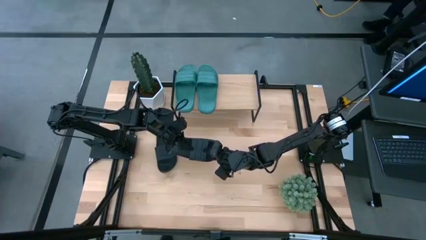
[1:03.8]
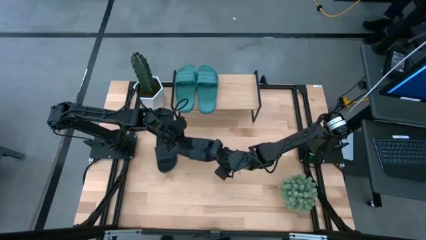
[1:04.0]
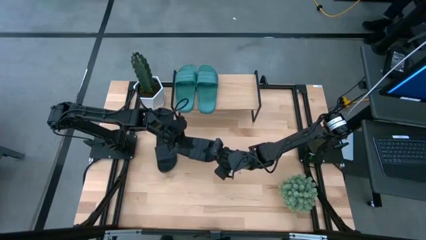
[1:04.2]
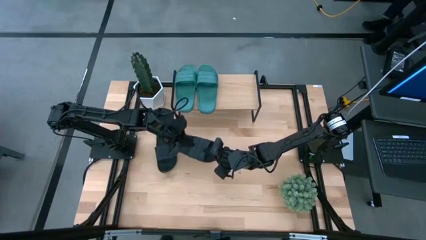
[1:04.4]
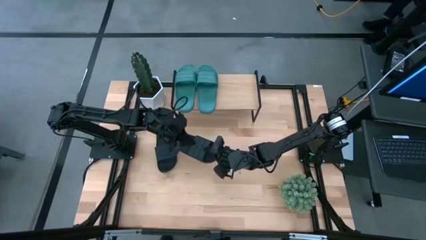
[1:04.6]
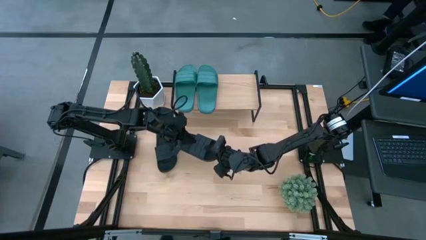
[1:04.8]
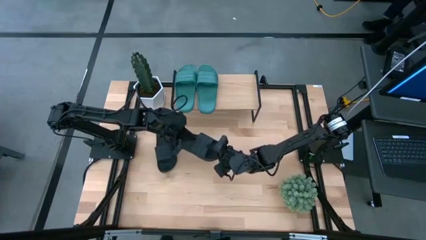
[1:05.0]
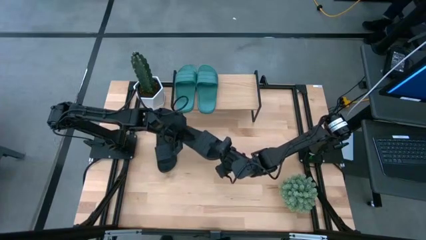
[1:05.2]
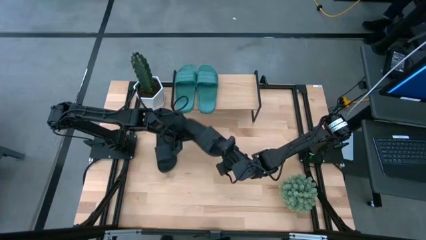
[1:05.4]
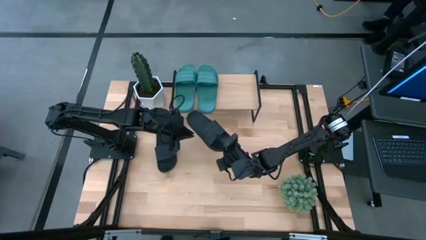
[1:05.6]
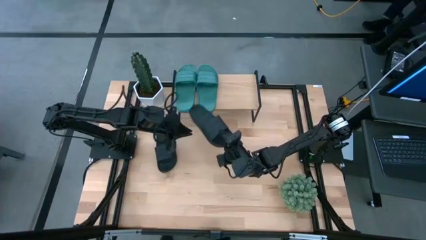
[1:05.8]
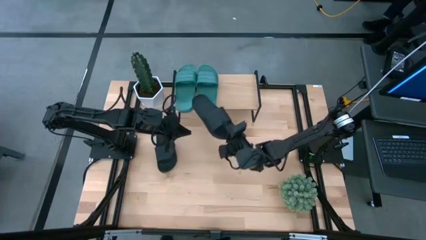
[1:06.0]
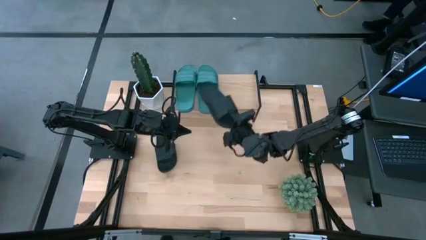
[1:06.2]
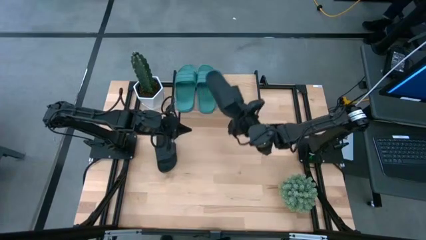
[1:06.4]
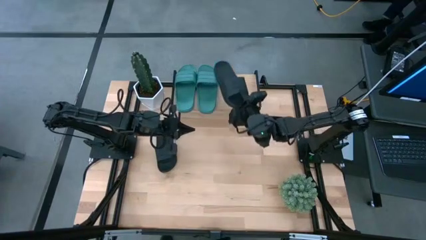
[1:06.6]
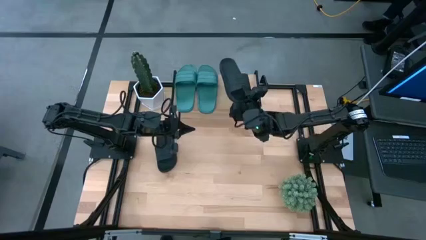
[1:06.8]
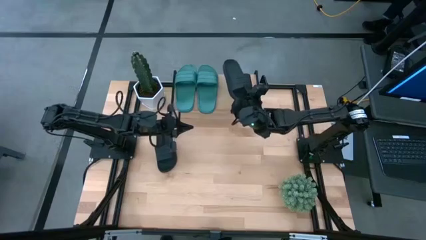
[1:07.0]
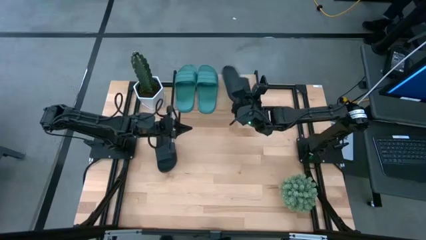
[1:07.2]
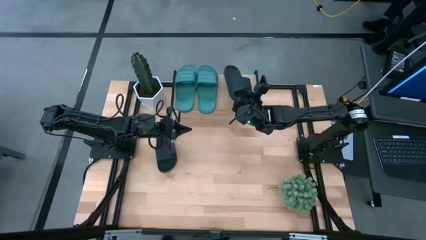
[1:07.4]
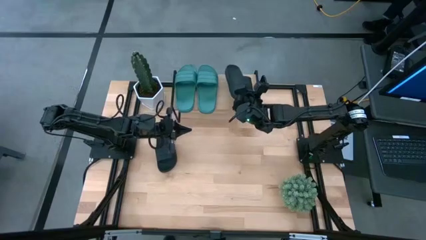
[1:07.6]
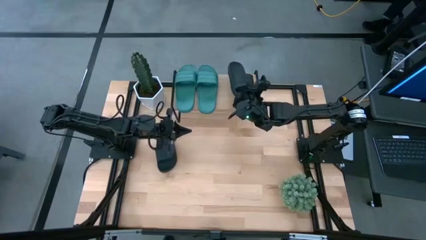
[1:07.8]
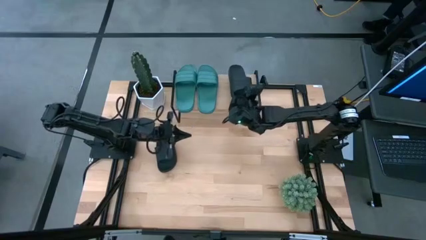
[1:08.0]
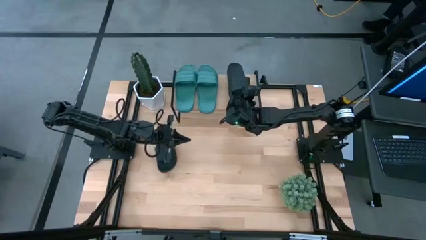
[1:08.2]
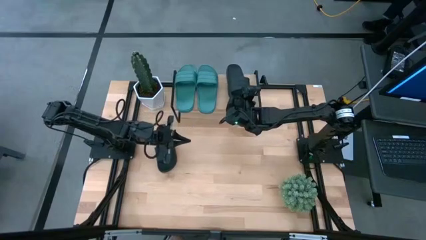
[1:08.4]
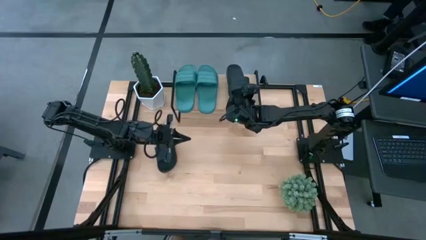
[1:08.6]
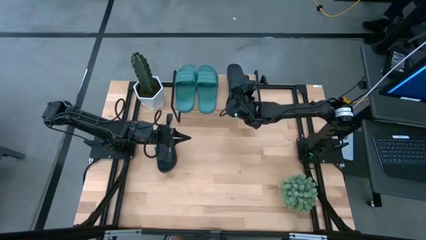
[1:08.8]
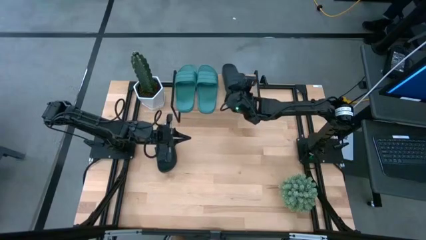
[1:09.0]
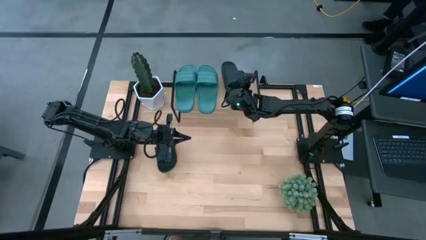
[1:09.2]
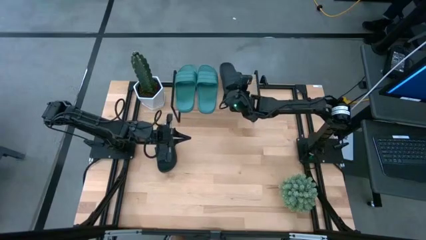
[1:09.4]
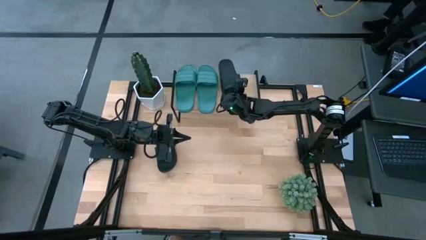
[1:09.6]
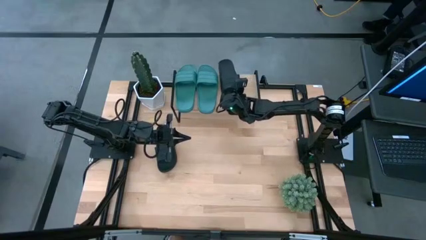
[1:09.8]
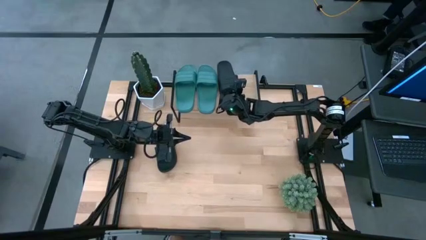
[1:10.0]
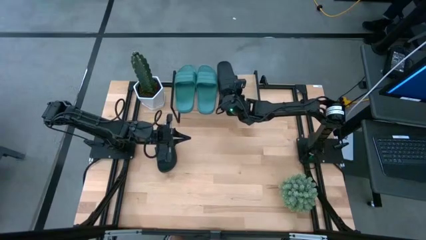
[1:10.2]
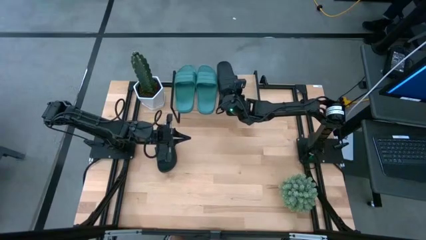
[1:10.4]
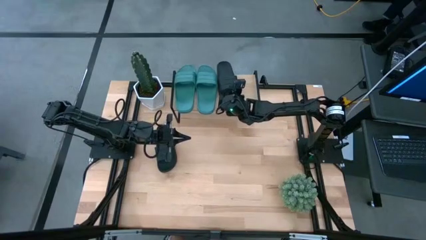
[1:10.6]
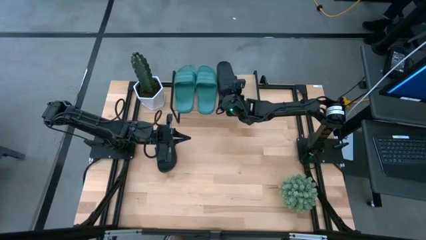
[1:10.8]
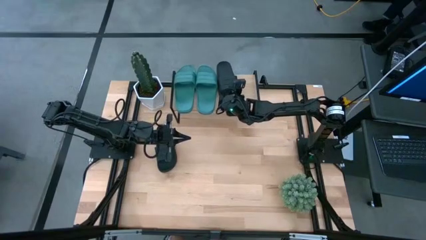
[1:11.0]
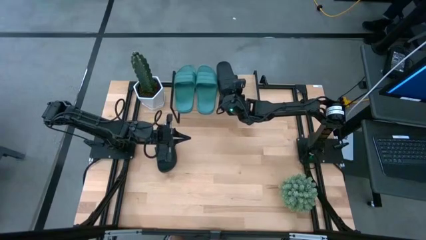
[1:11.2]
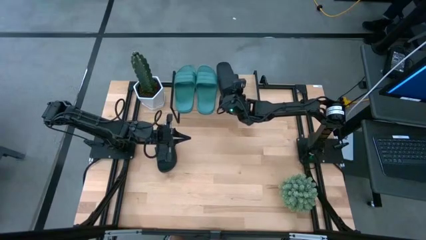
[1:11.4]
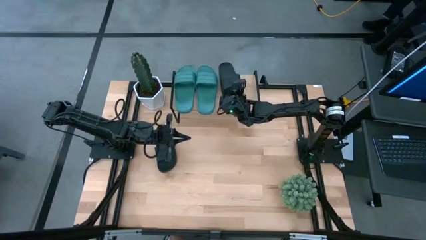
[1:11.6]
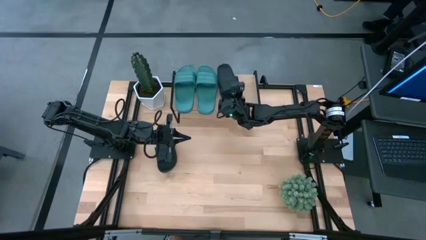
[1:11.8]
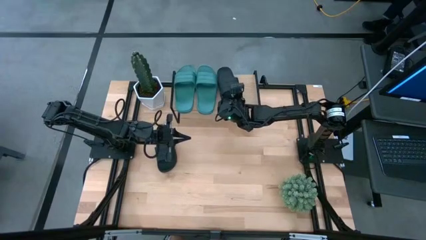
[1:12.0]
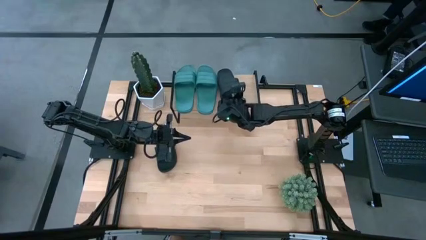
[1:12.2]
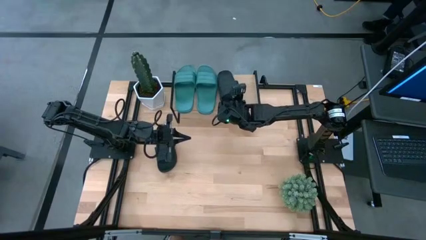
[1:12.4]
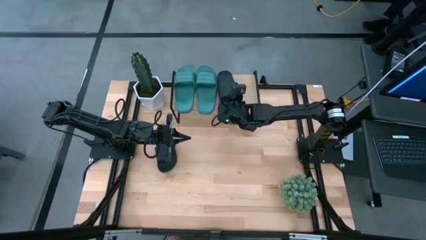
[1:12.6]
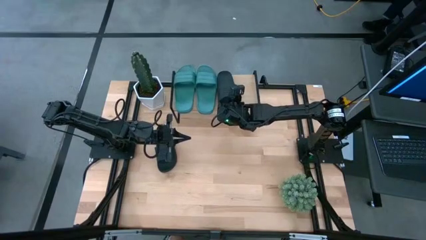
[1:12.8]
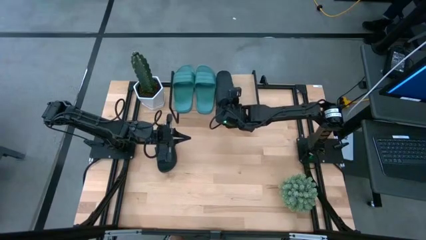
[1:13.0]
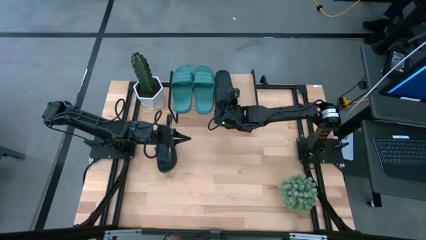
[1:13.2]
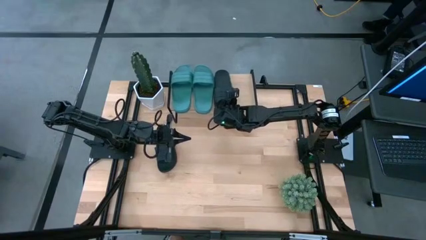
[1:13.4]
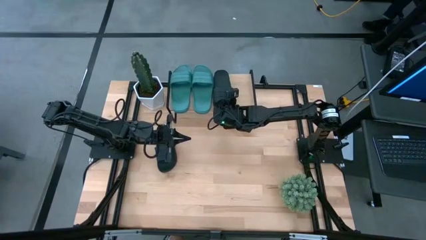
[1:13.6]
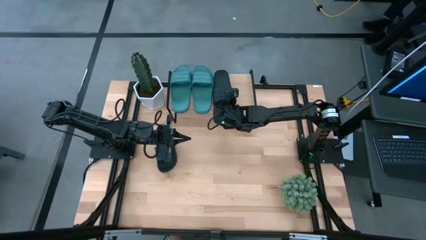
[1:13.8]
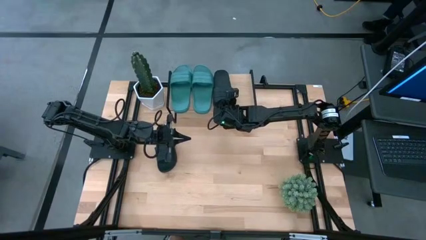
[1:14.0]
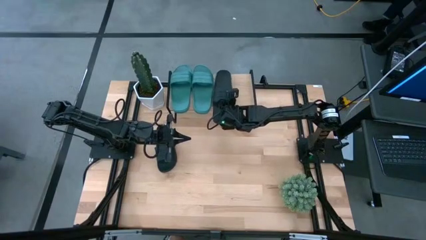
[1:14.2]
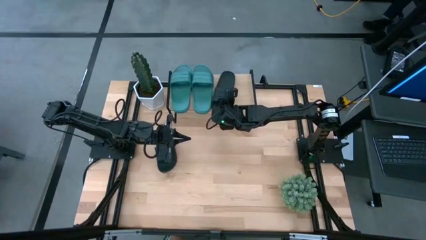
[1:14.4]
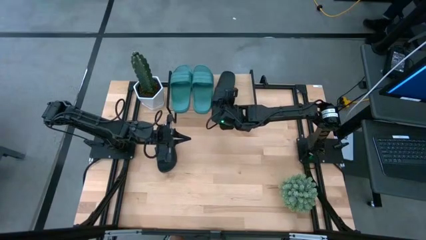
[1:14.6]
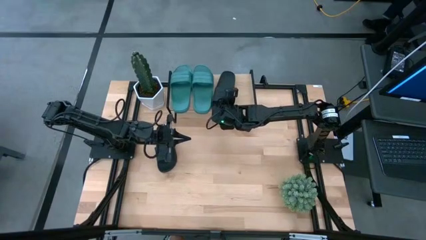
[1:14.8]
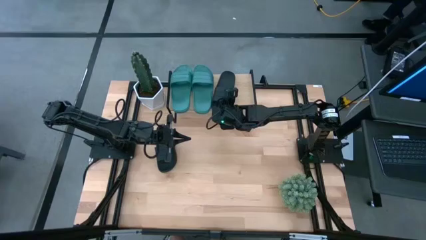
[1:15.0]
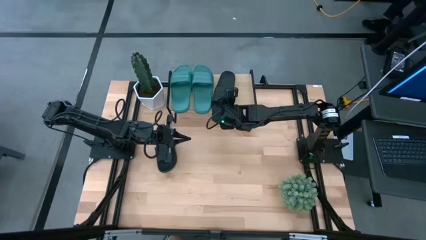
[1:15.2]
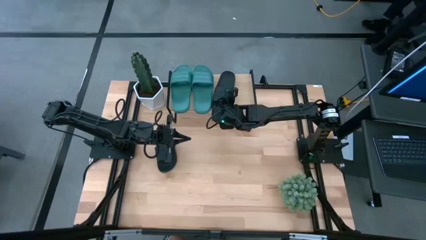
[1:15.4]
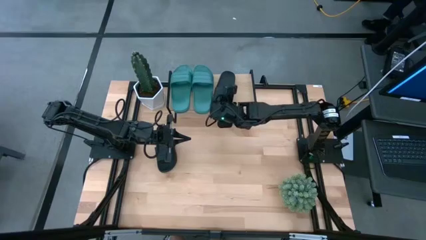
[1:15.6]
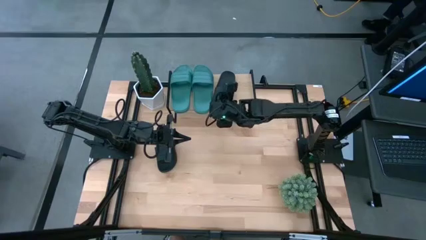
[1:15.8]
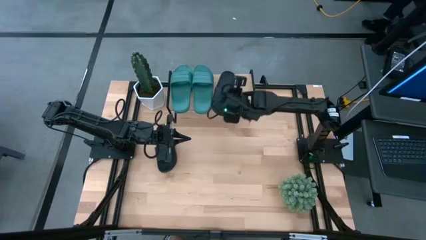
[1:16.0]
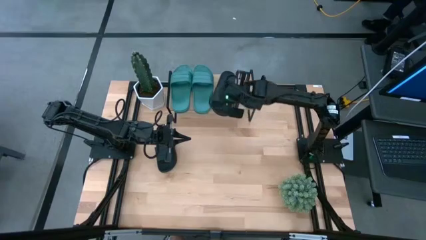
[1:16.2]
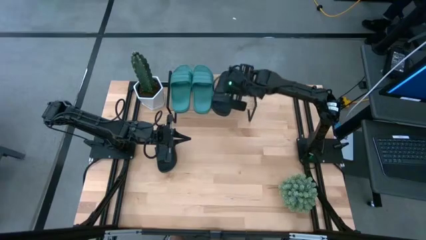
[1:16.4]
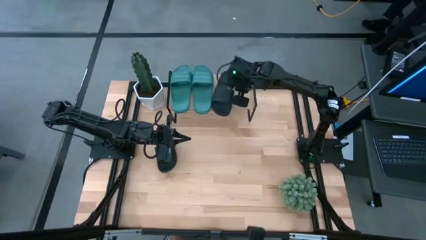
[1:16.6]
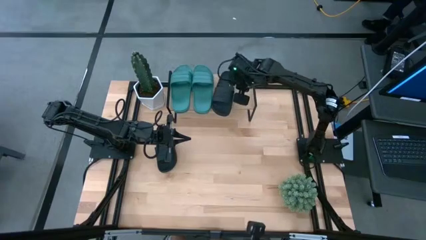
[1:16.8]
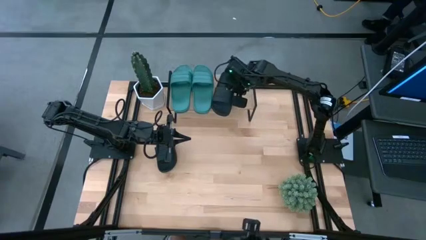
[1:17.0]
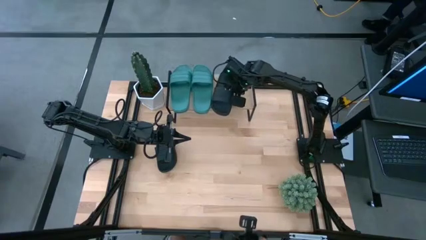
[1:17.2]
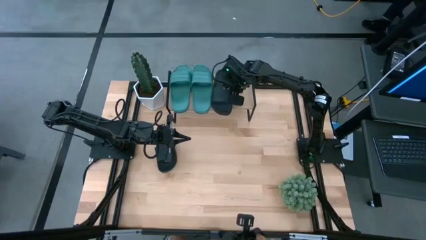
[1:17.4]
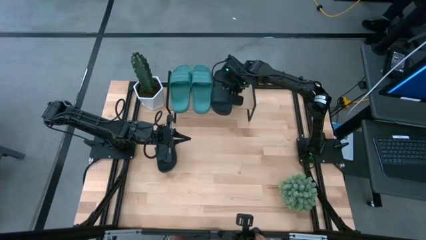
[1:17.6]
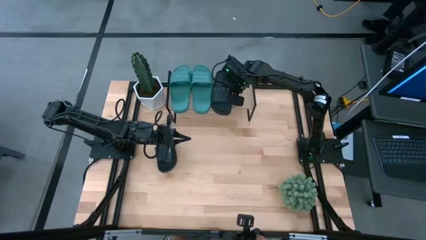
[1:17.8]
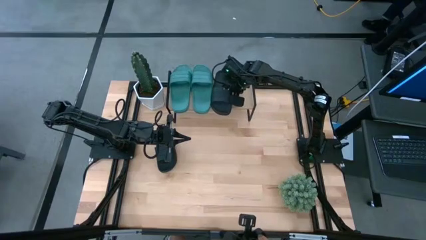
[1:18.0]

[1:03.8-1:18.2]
Task: Pick and place slides into the shelf
Put the black slipper on the shelf

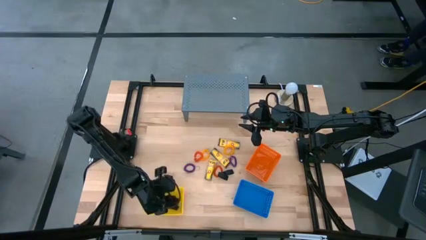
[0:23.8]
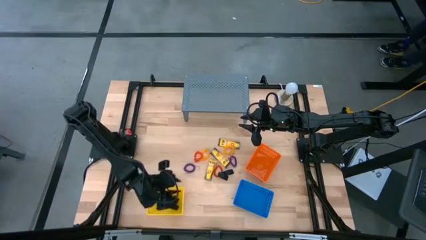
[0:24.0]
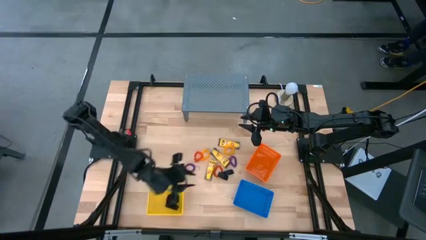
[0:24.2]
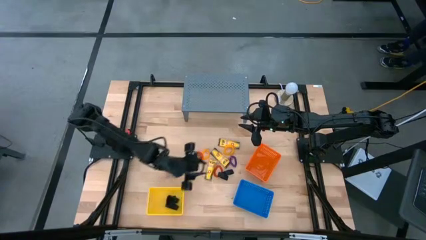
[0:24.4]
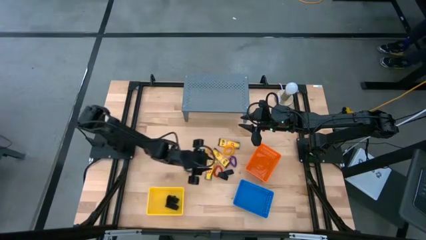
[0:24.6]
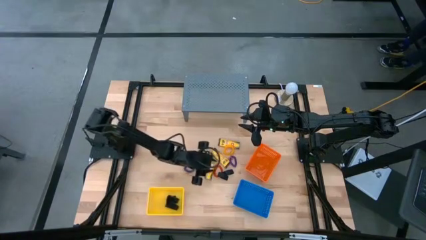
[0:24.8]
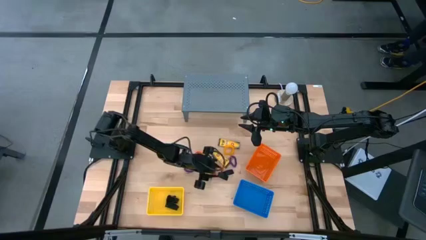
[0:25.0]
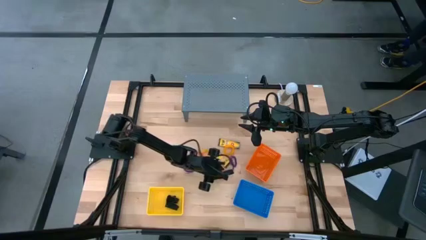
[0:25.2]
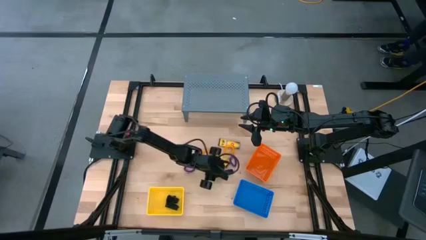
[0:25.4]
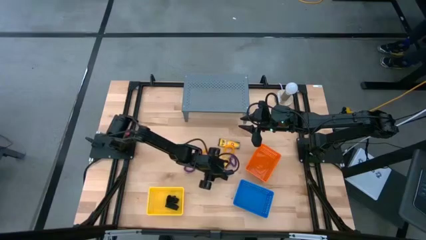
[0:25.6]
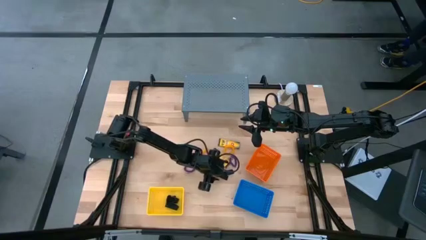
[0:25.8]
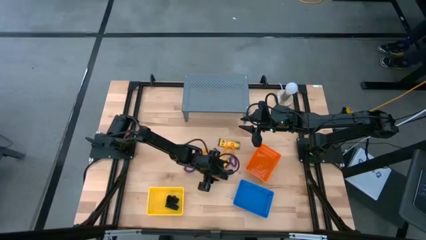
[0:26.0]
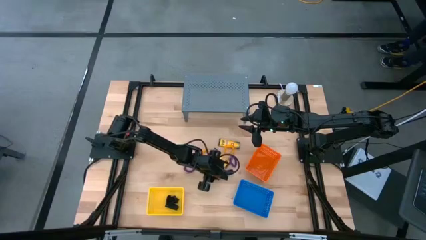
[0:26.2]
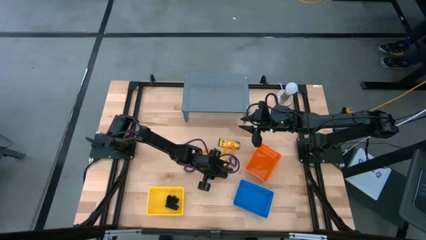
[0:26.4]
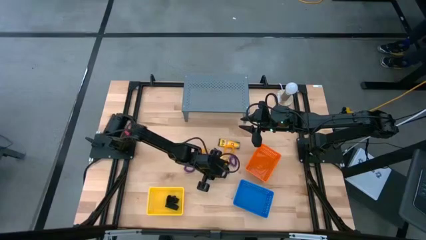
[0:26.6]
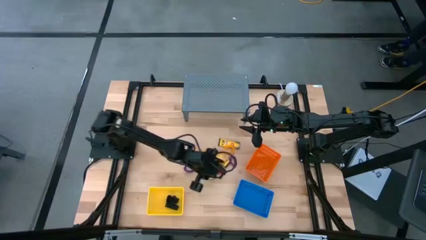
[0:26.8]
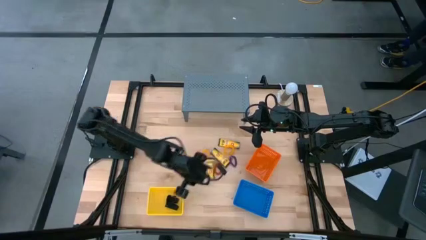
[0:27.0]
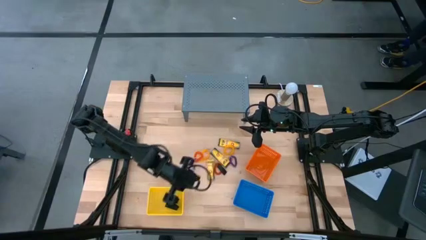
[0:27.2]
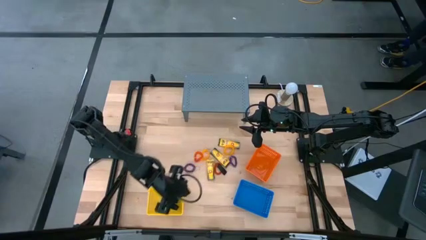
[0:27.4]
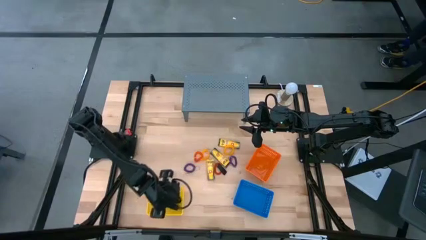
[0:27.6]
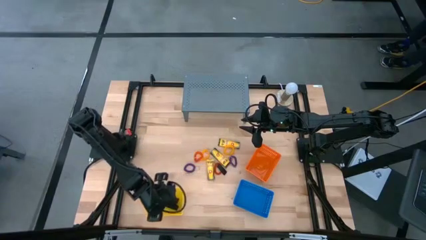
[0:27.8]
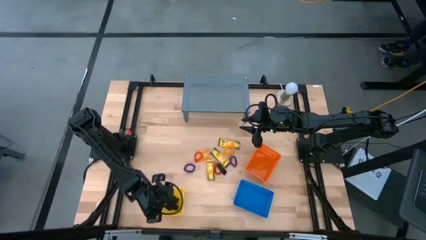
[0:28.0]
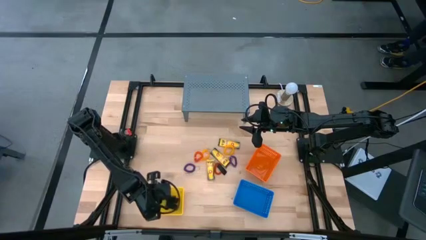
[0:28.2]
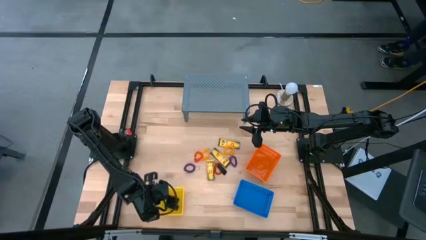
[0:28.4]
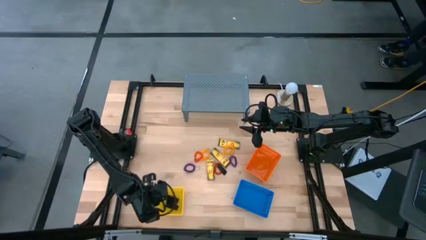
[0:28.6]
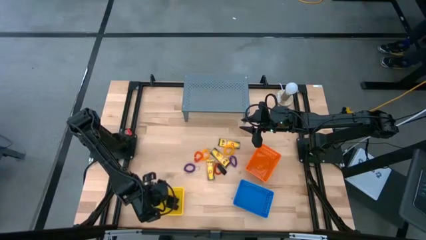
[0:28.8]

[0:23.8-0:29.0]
Task: Pick & Place Office Desk Supplies
Put the black rubber band into the yellow basket
